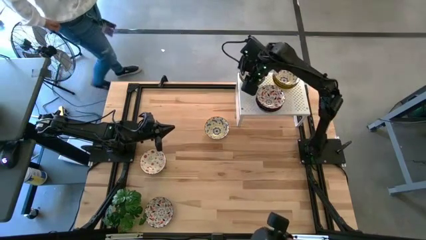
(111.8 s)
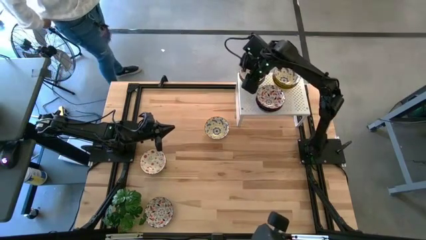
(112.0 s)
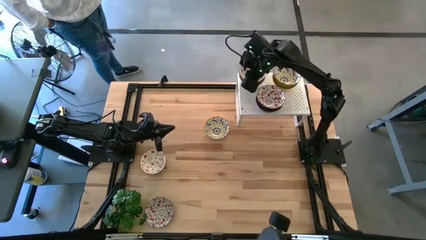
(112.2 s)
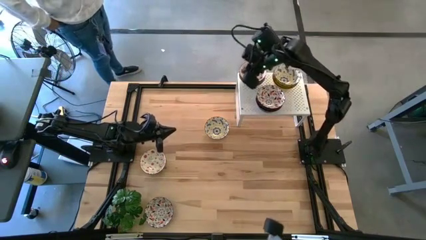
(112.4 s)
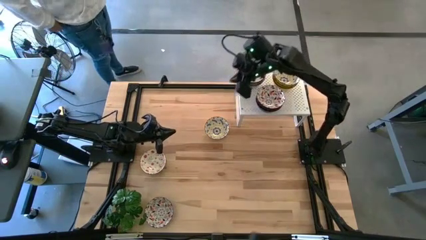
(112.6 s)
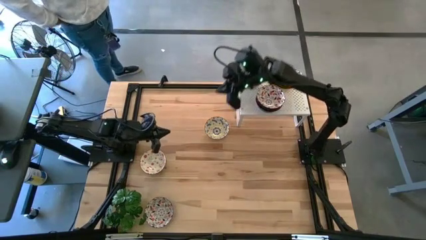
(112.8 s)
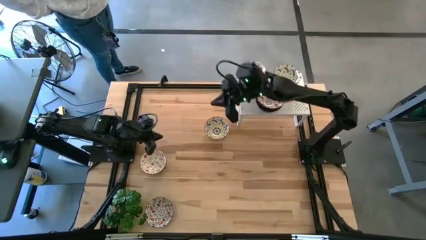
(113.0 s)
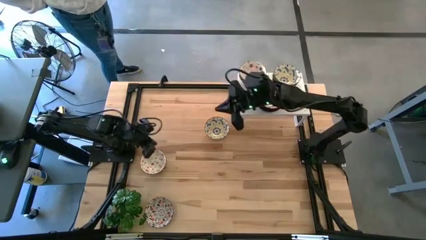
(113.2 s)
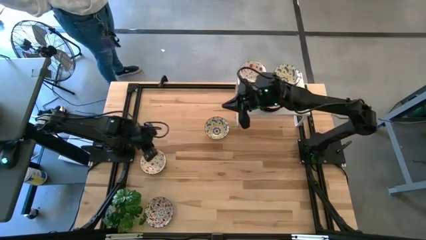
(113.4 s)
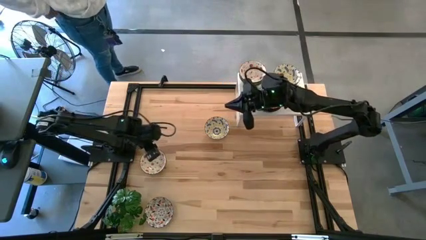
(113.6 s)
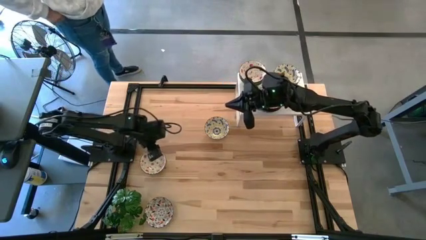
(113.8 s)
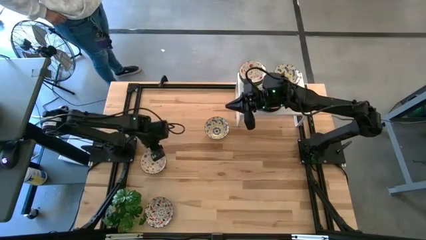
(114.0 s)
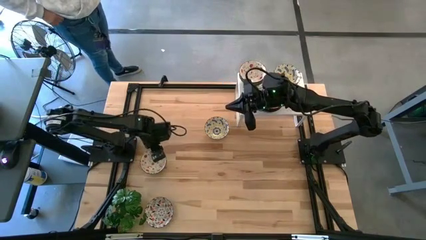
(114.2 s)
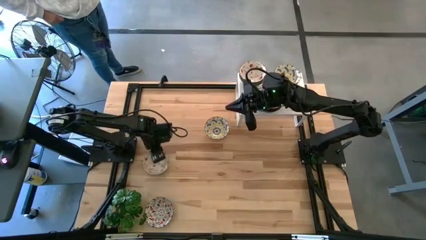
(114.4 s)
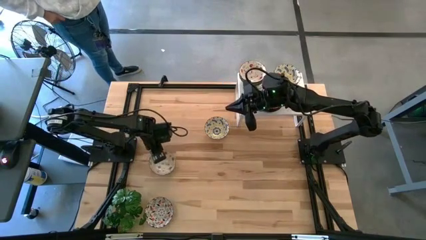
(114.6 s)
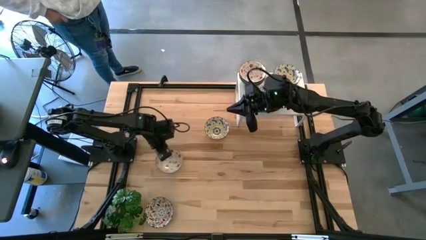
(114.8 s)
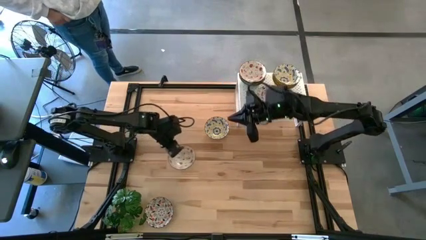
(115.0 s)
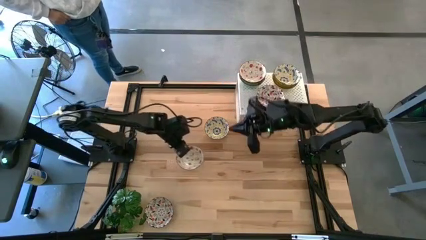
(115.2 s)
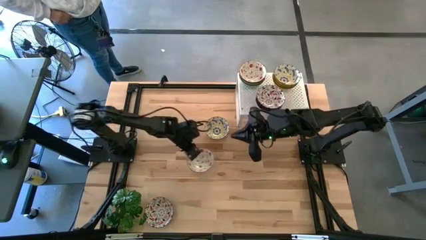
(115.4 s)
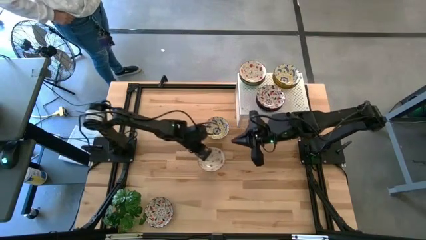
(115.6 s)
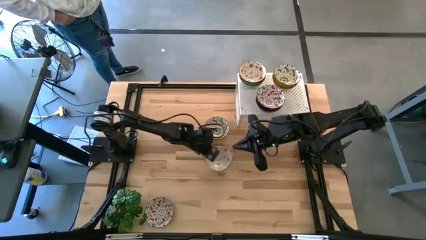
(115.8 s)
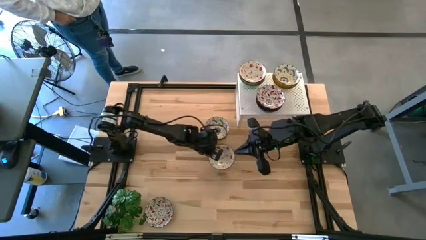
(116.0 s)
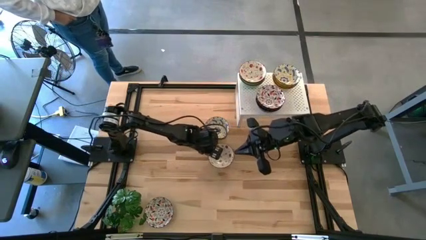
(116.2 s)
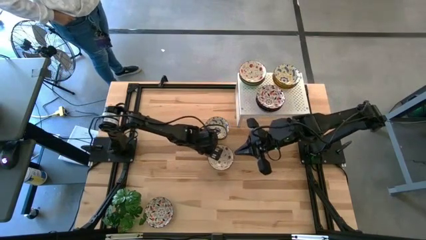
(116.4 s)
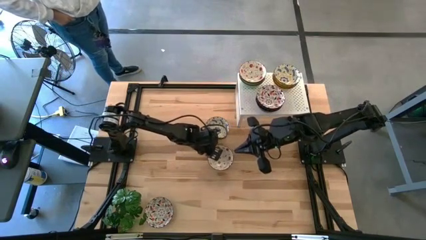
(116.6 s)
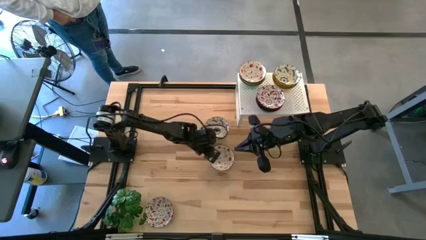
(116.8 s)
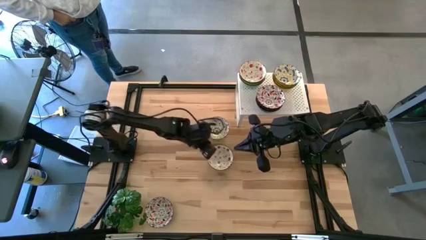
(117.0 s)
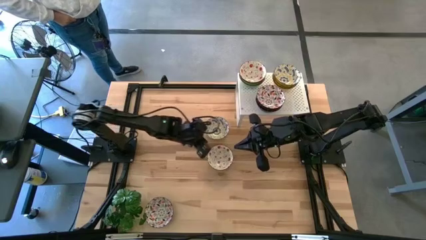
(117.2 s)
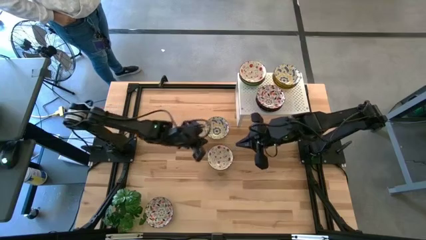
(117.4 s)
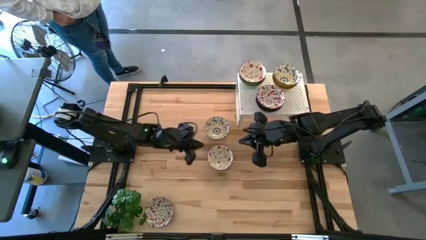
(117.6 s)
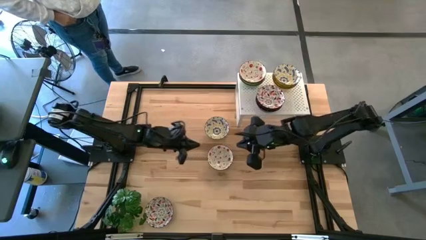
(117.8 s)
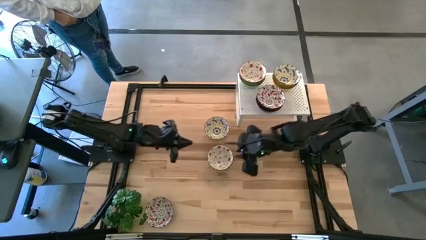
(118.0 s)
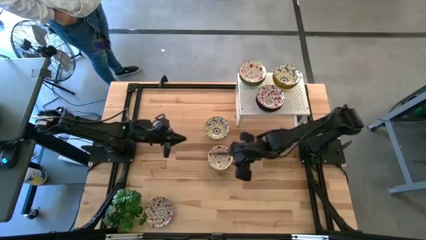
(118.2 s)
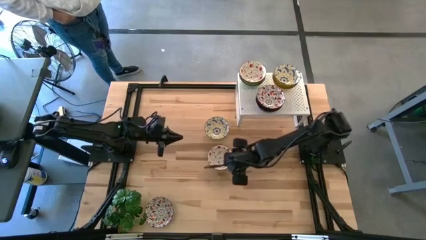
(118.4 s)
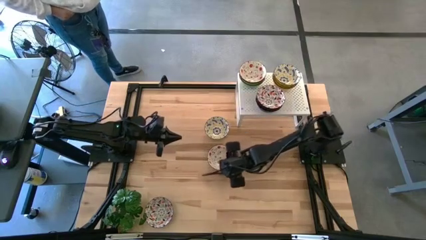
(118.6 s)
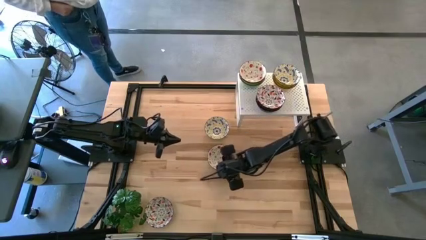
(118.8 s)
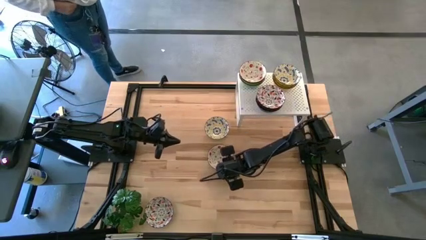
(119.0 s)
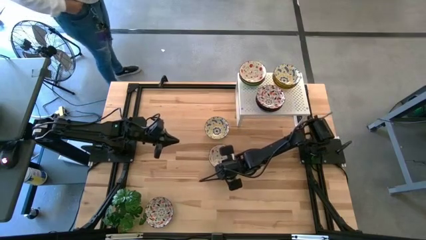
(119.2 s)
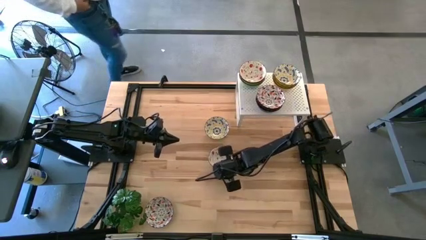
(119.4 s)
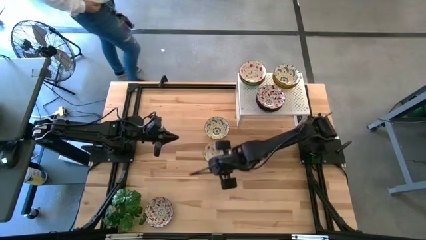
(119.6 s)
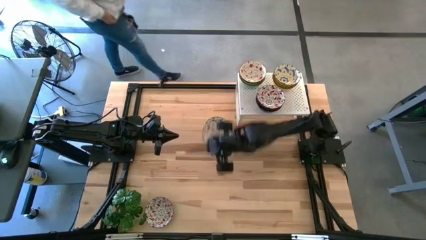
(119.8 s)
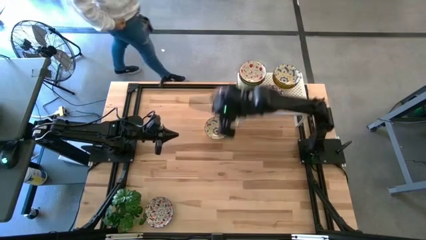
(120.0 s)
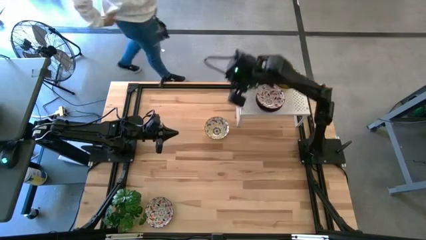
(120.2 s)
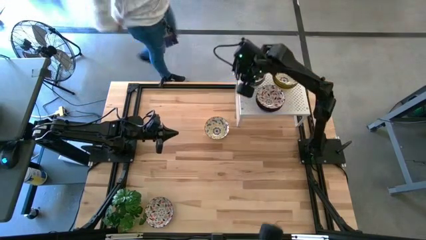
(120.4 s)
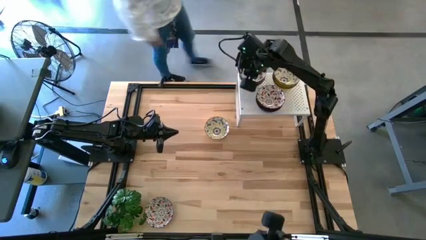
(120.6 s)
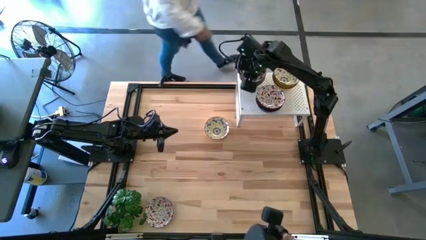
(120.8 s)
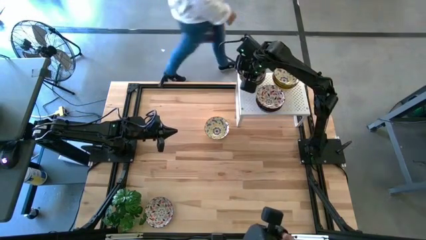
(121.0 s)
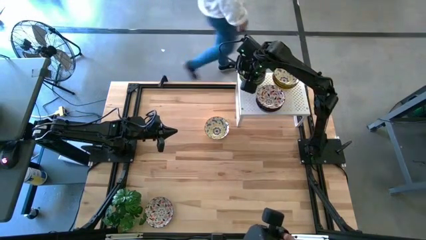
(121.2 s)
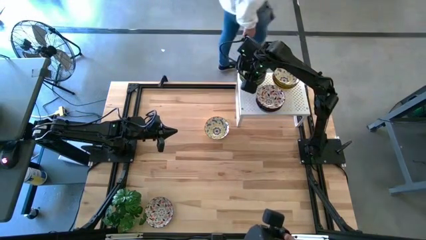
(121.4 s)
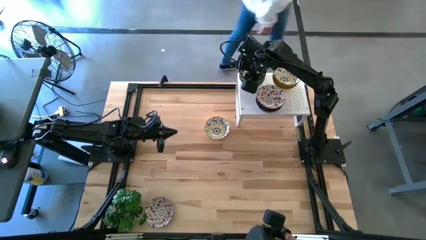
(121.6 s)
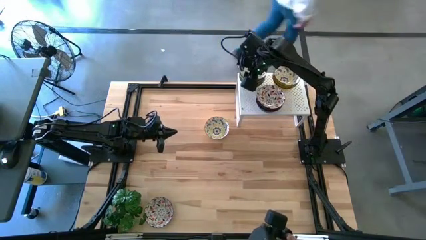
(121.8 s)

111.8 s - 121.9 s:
Task: Pick & Place Mini bowls
Stack the green patterned bowl on top of the green bowl on the shelf

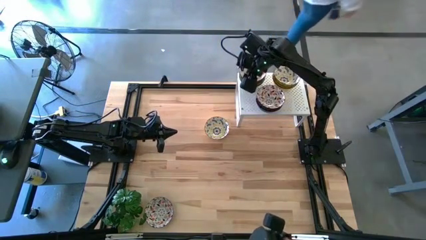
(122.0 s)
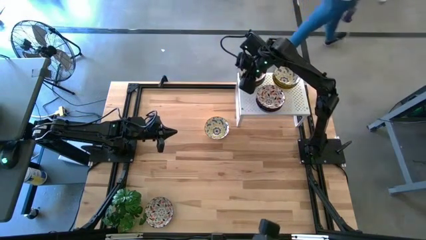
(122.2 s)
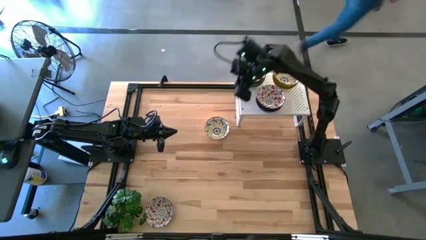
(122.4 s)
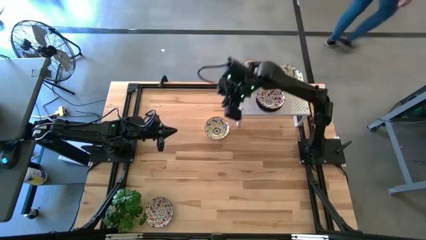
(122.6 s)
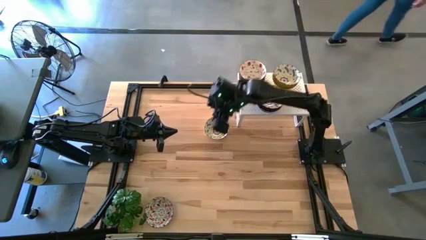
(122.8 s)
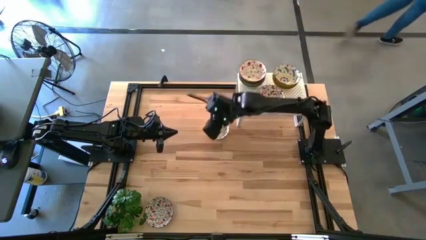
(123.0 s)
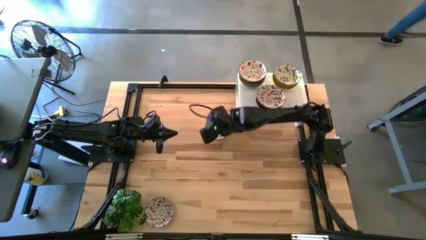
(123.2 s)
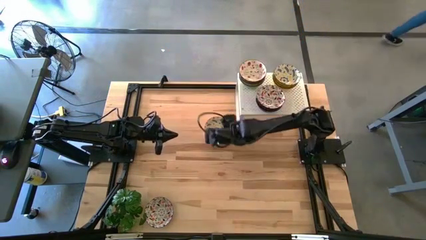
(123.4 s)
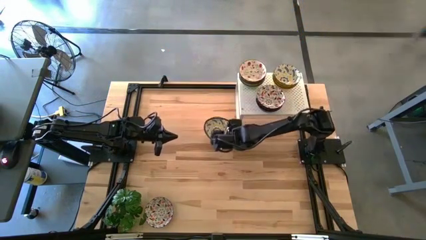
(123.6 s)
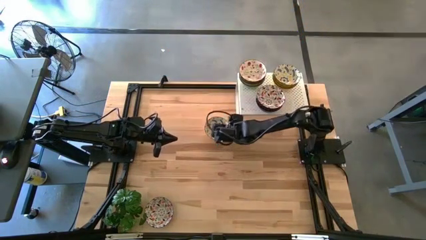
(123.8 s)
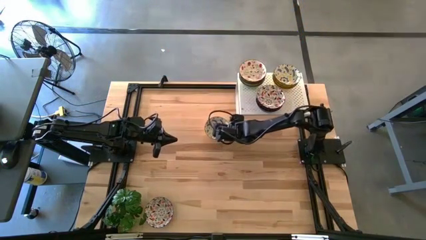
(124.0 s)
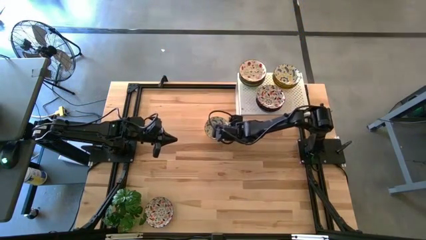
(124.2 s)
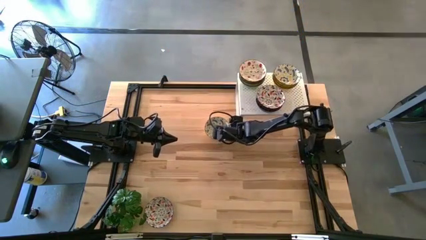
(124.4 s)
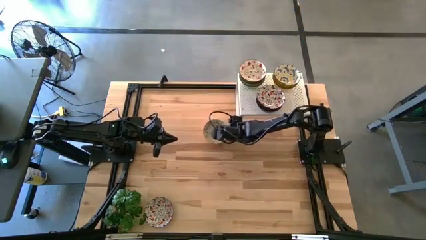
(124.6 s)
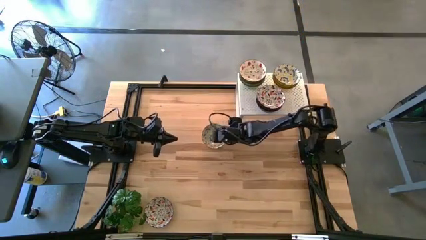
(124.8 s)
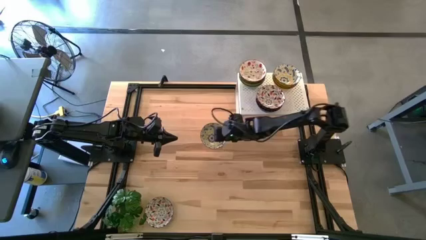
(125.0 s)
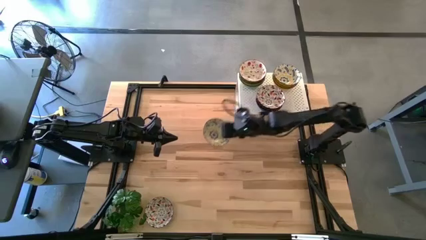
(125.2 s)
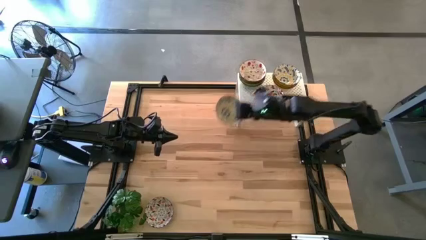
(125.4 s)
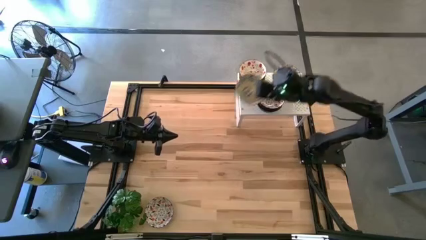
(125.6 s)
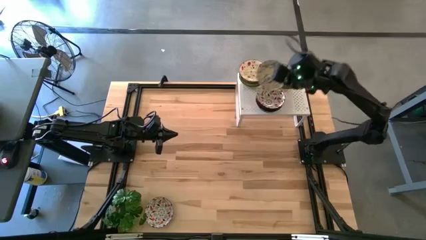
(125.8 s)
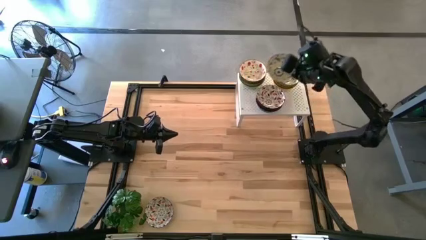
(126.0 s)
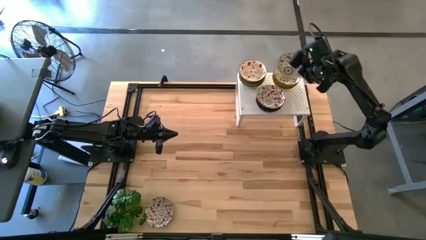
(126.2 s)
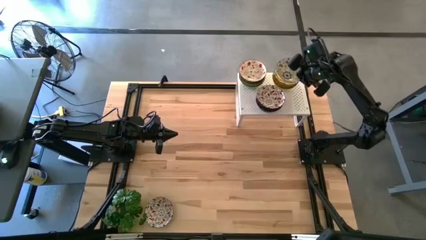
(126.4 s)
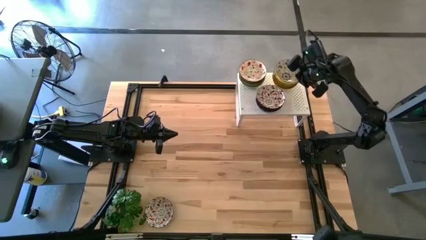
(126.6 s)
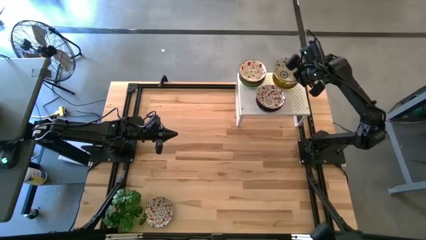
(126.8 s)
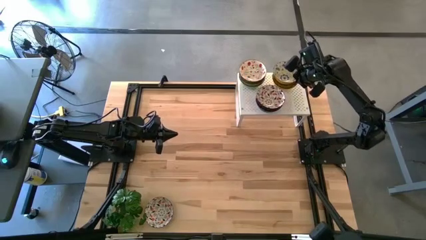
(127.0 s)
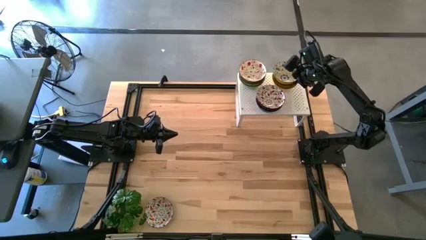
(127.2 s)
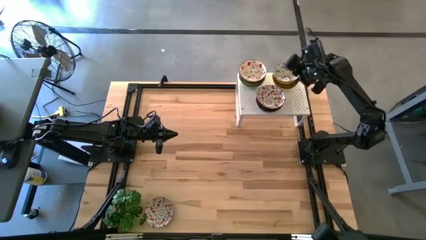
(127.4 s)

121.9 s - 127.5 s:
Stack the yellow patterned bowl on top of the yellow patterned bowl on the shelf
